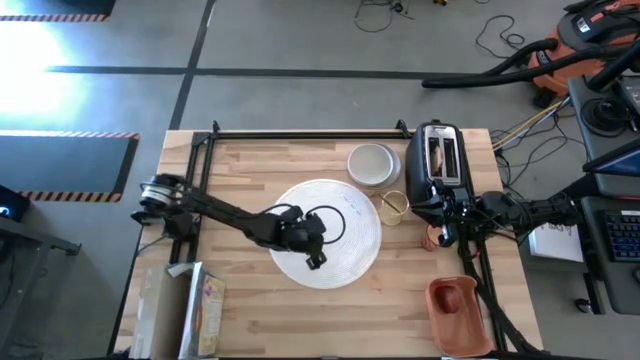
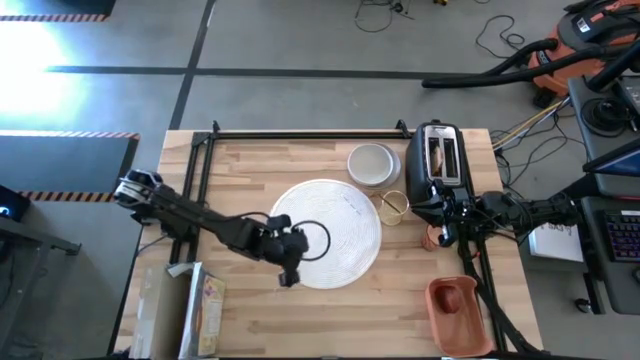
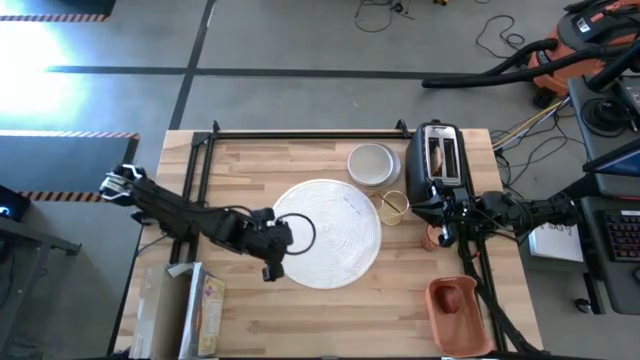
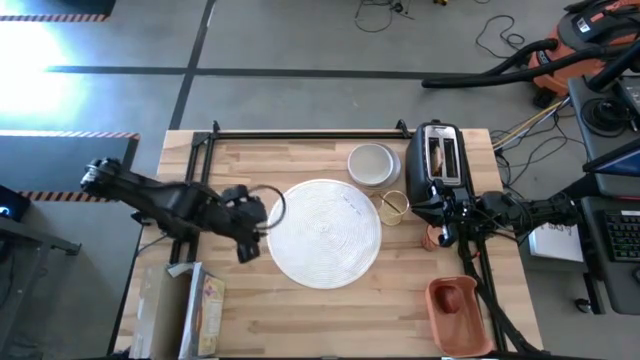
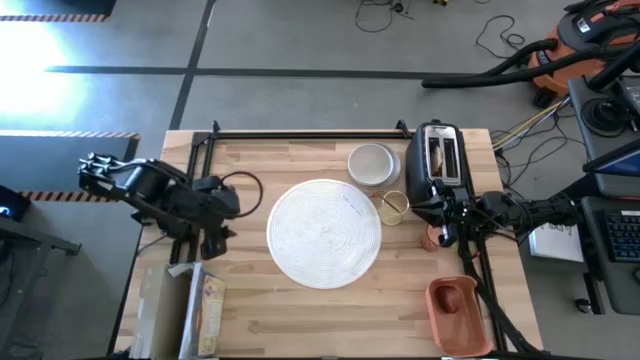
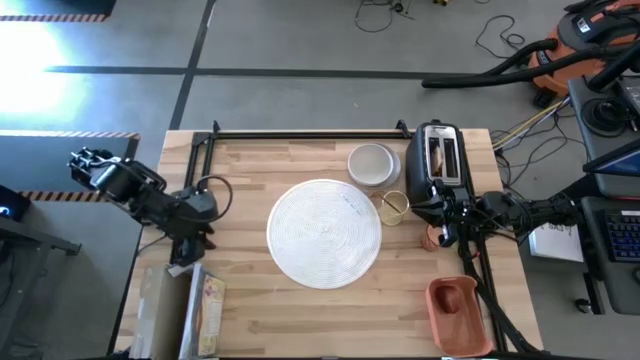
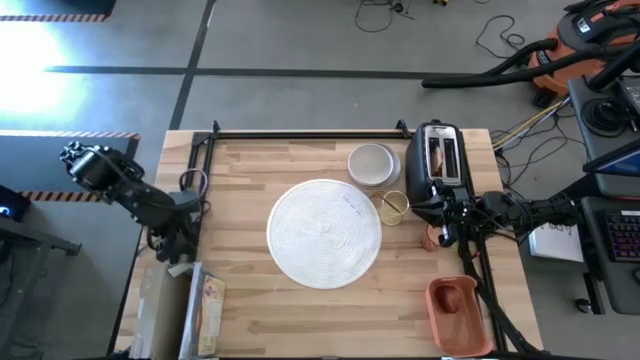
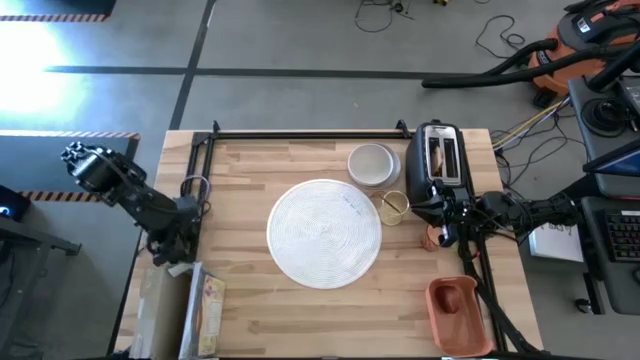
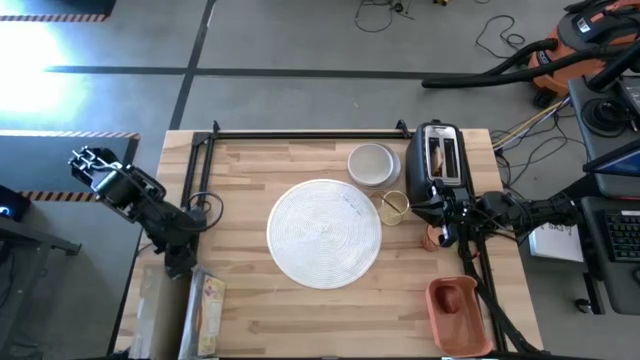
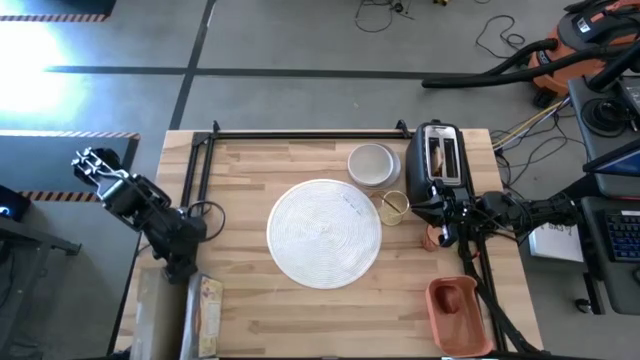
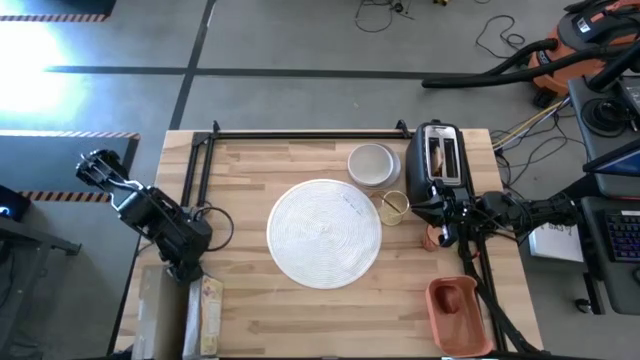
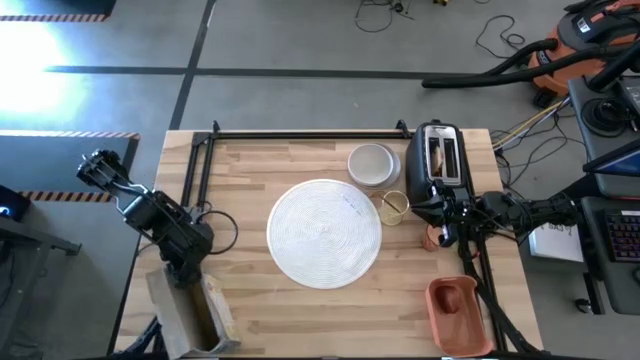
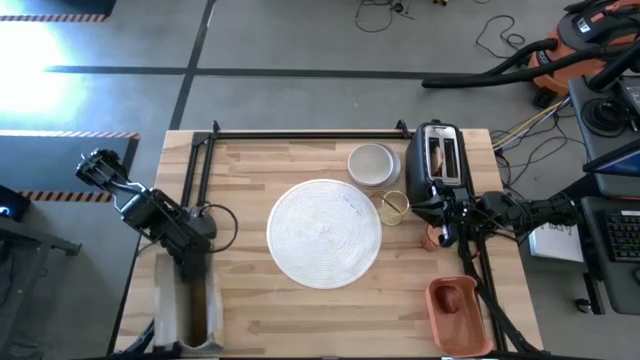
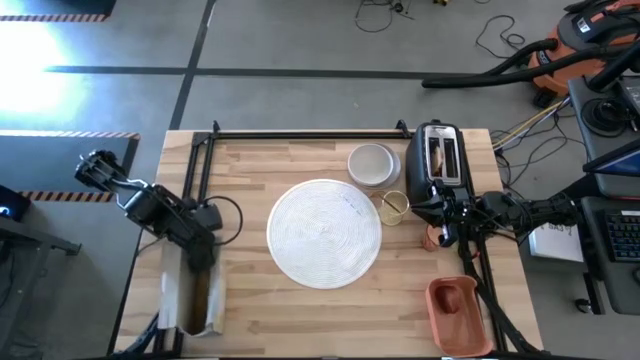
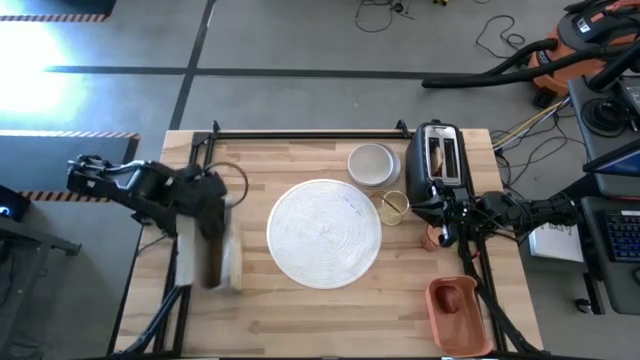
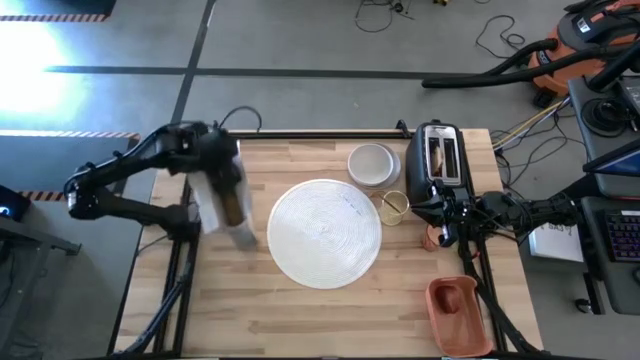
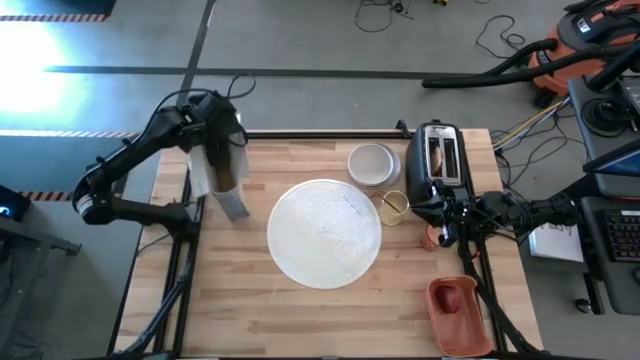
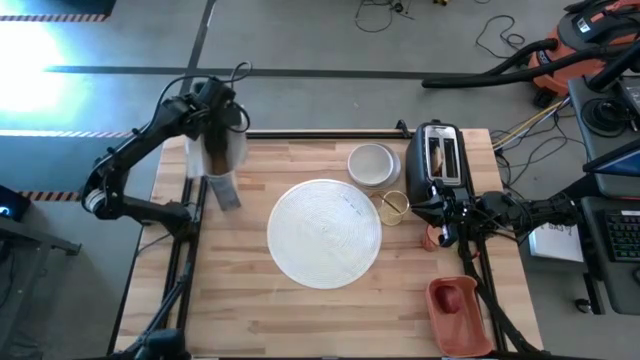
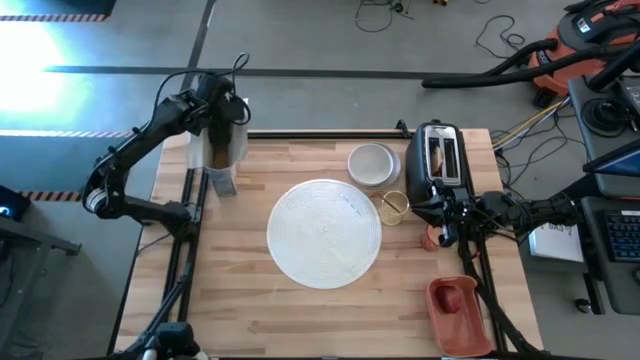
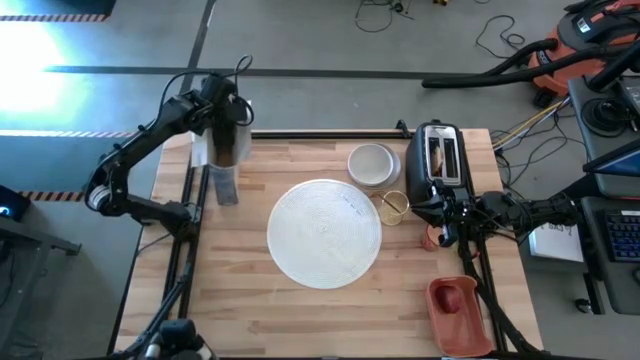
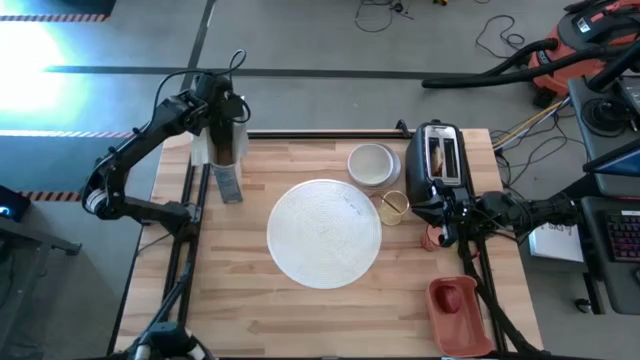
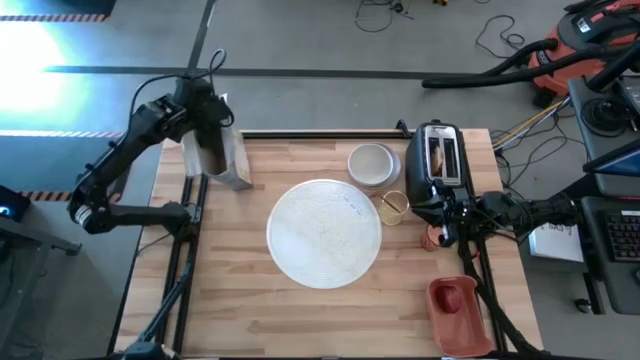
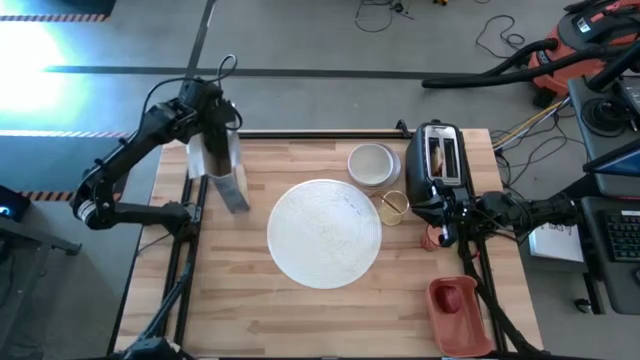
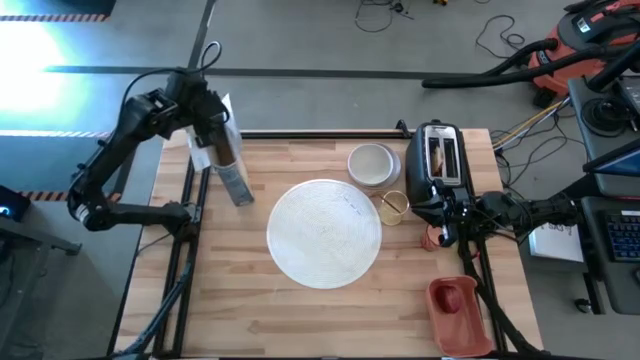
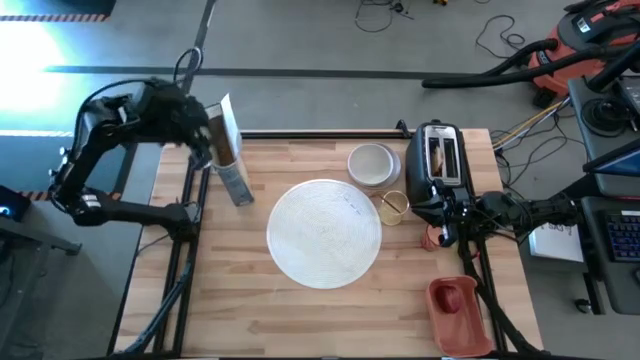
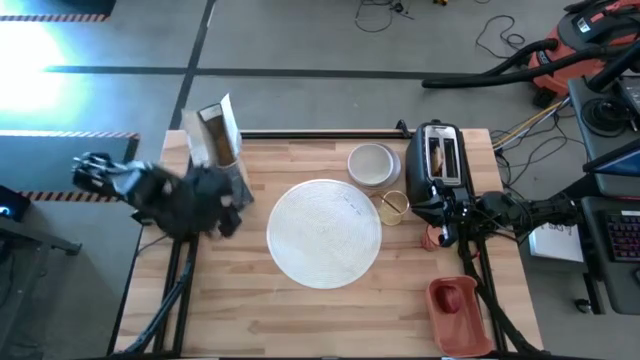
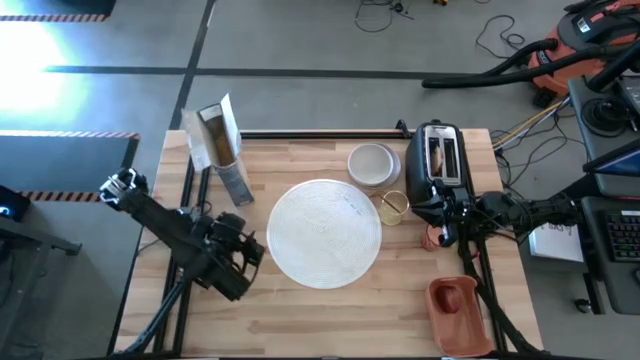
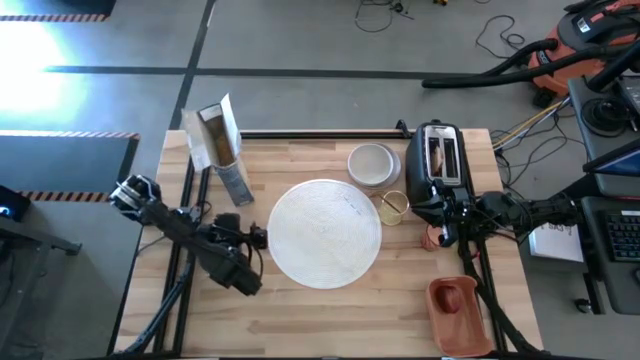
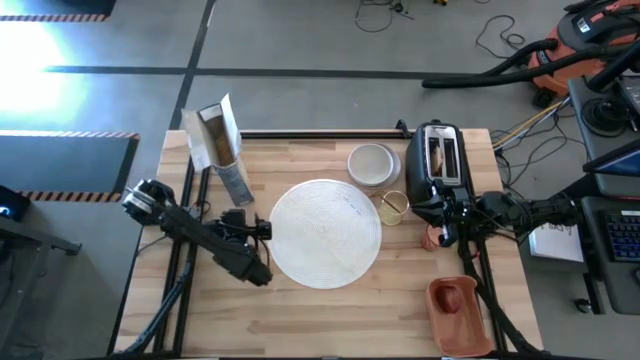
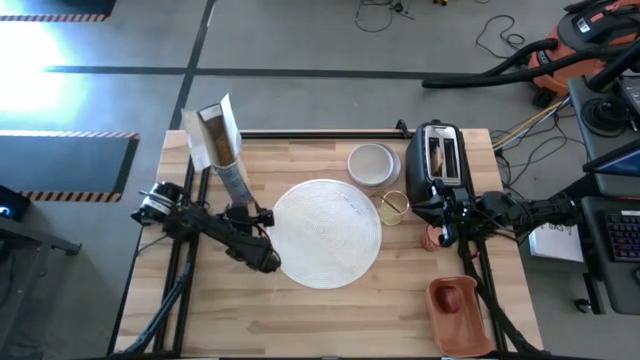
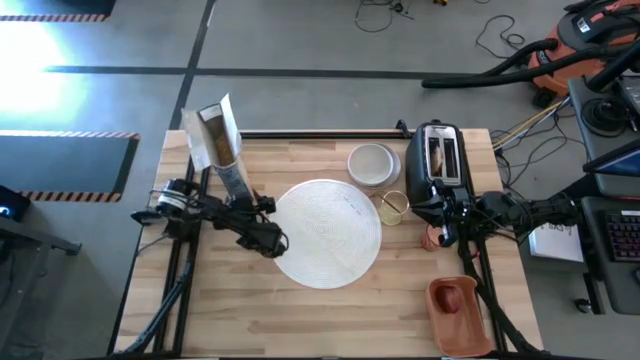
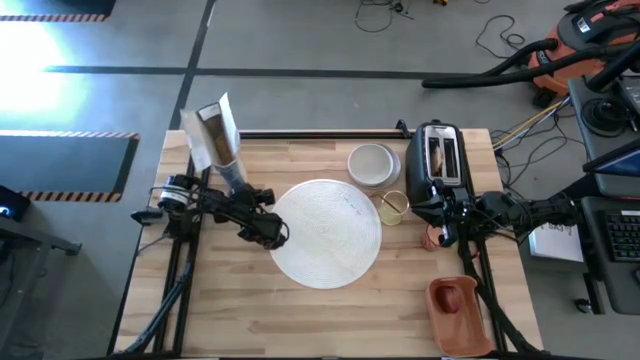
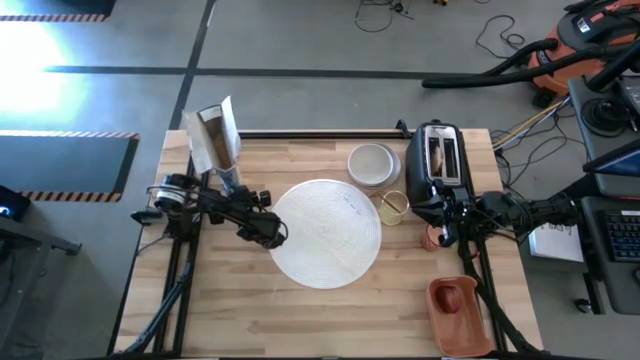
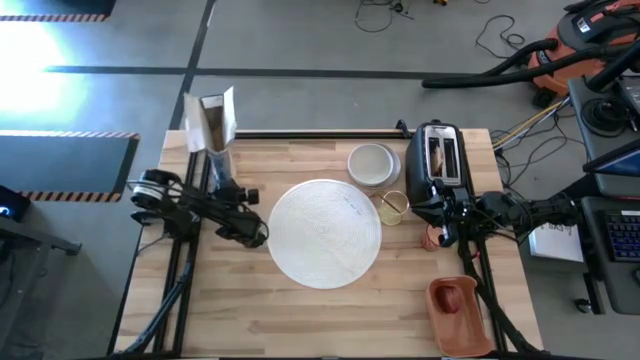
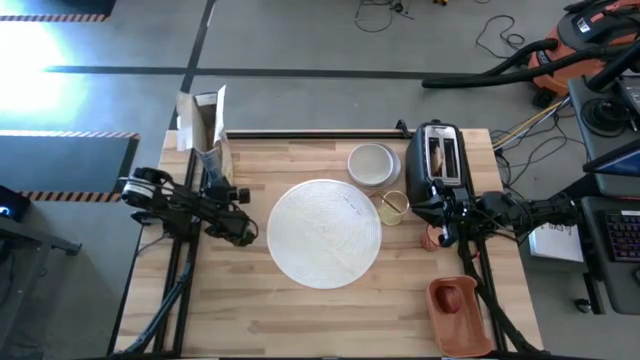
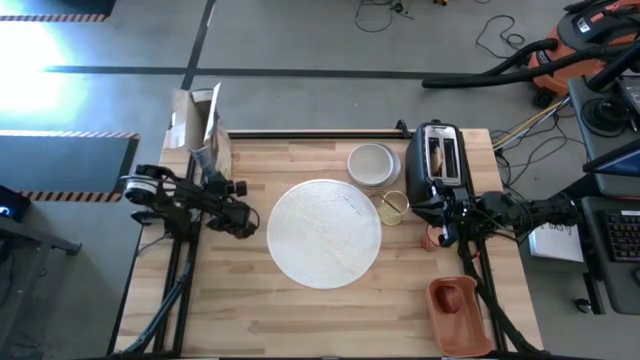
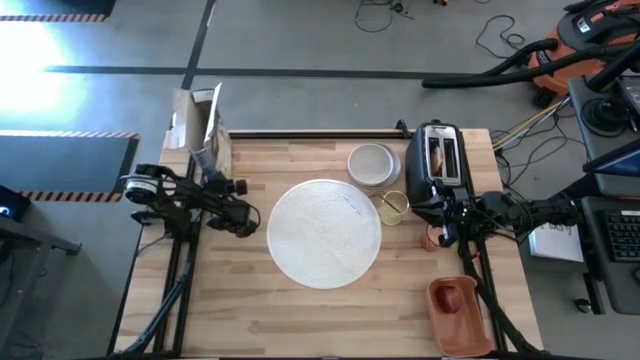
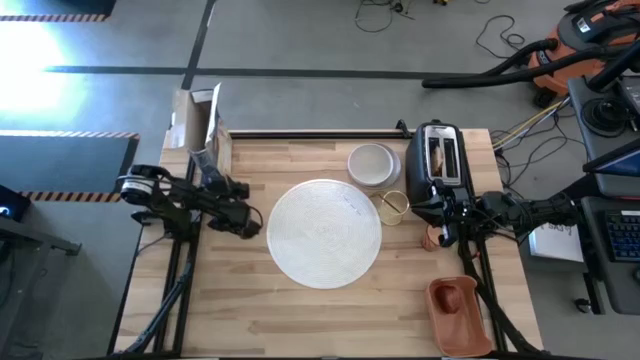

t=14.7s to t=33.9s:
Task: Arrange a breakfast setting
Move the cereal to the top left of the table

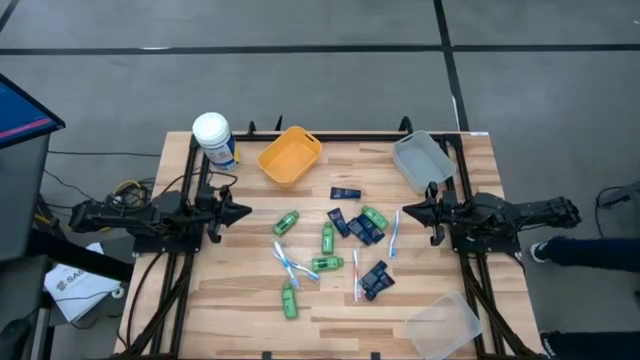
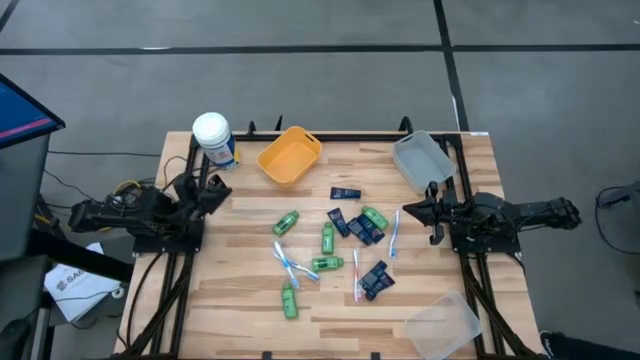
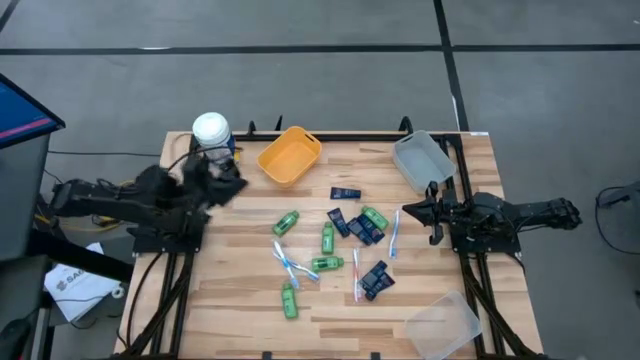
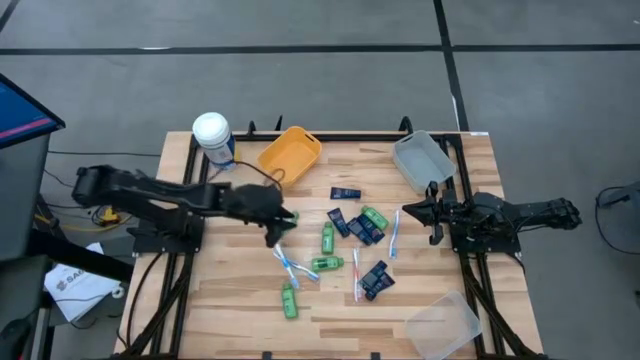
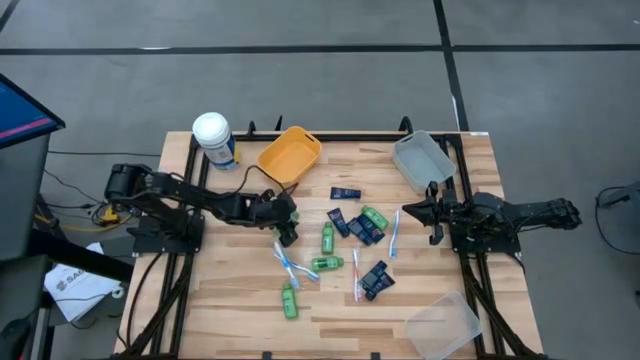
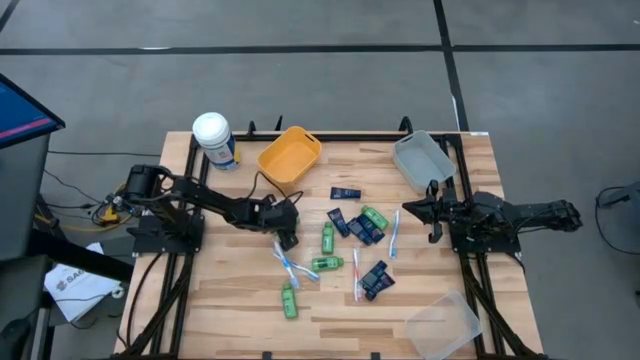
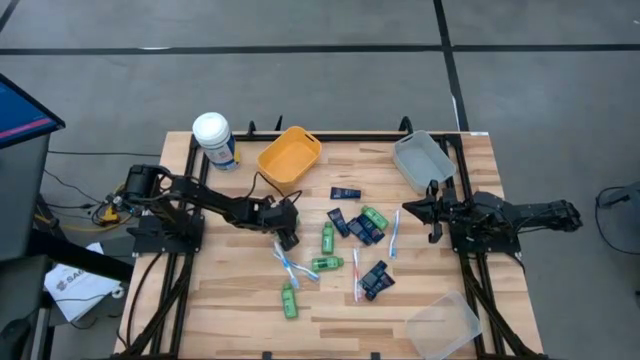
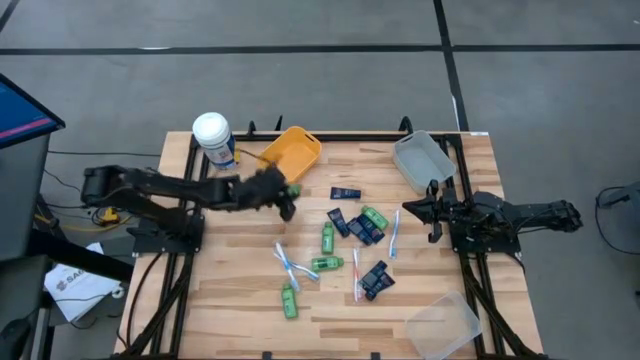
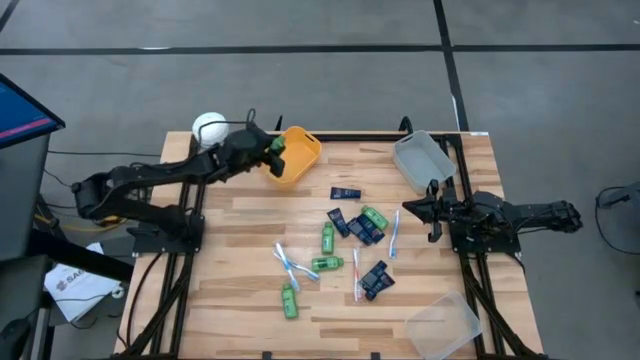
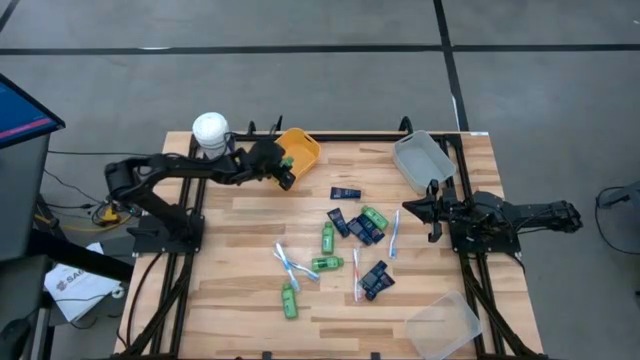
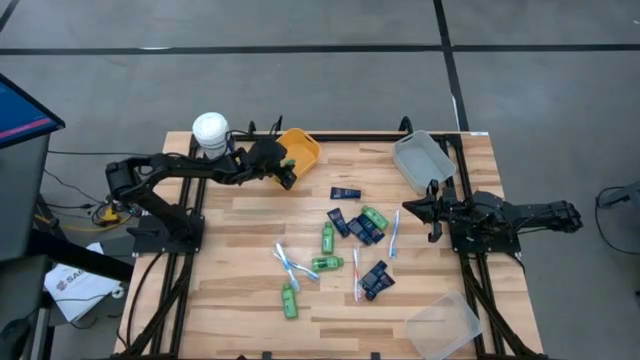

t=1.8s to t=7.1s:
Task: Pick & Place Travel size toiletries
Put the green shampoo into the yellow bin
